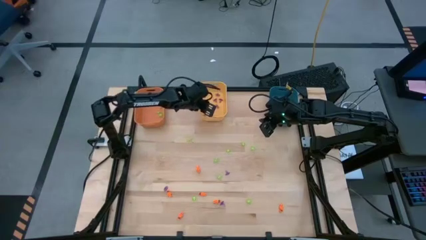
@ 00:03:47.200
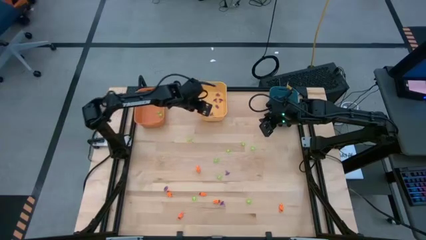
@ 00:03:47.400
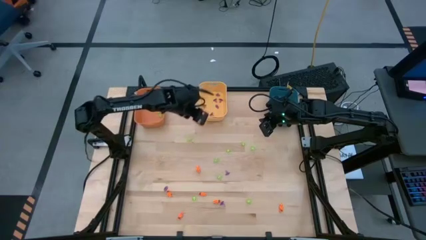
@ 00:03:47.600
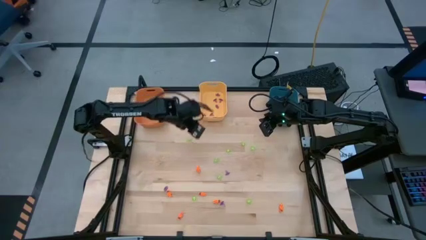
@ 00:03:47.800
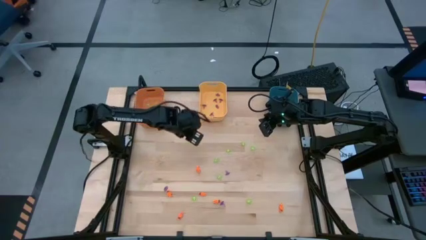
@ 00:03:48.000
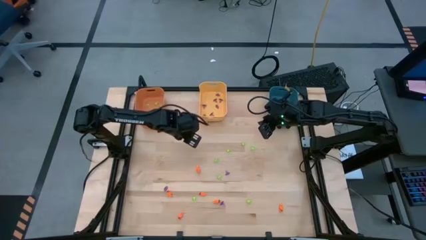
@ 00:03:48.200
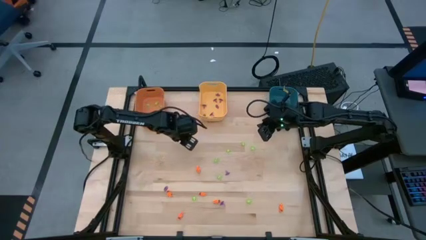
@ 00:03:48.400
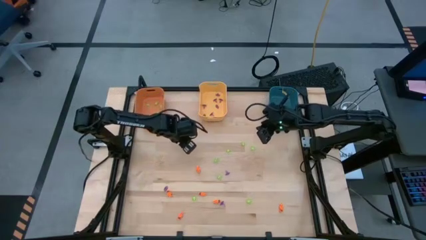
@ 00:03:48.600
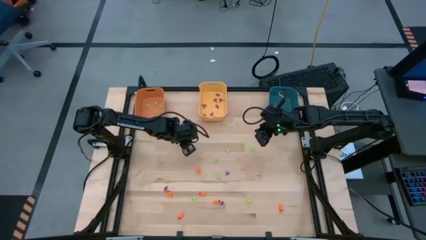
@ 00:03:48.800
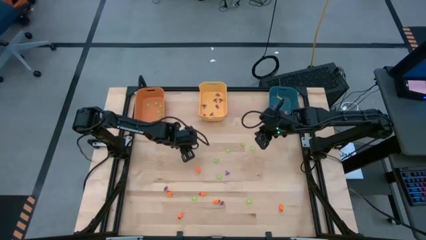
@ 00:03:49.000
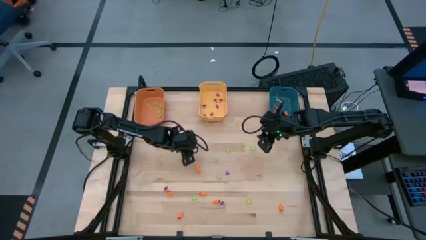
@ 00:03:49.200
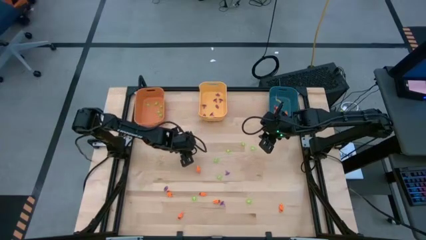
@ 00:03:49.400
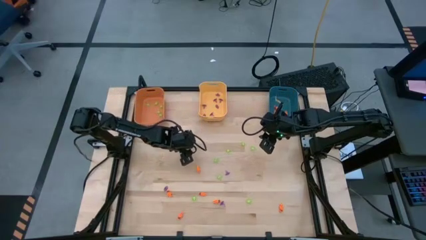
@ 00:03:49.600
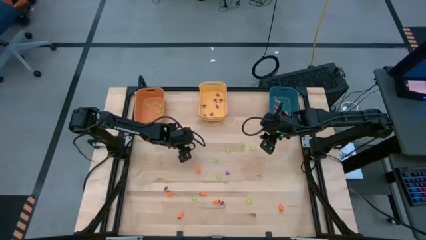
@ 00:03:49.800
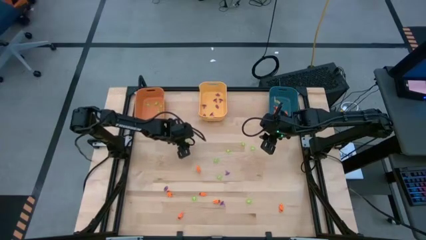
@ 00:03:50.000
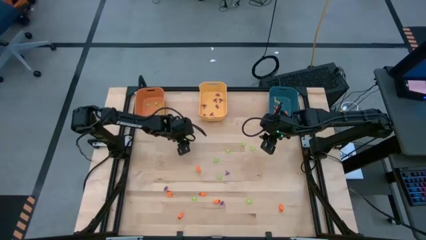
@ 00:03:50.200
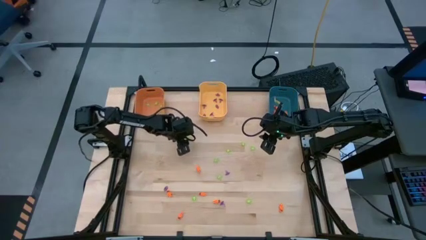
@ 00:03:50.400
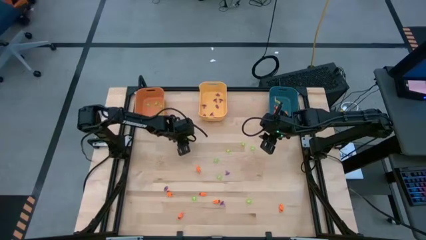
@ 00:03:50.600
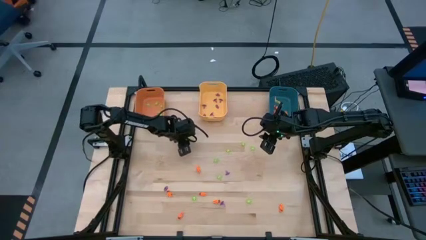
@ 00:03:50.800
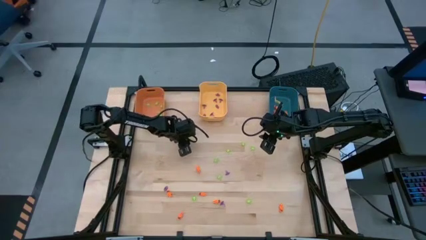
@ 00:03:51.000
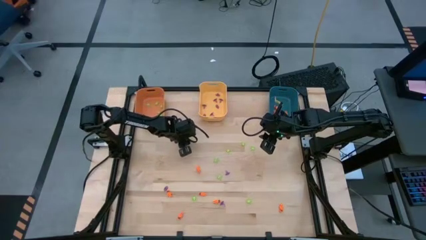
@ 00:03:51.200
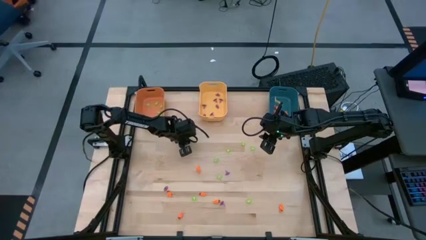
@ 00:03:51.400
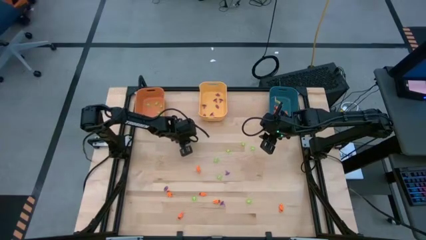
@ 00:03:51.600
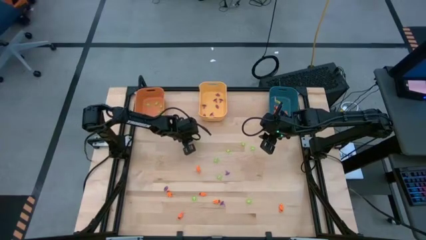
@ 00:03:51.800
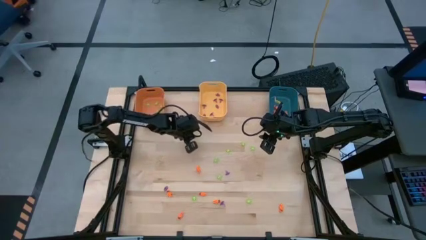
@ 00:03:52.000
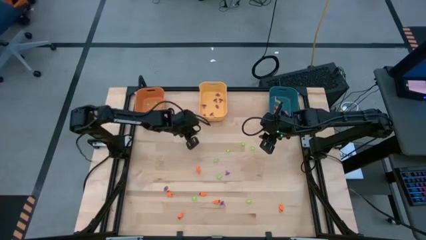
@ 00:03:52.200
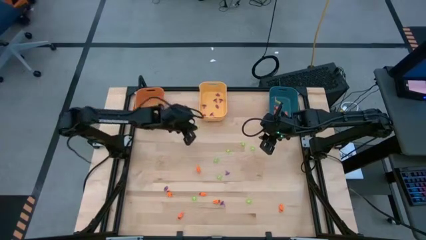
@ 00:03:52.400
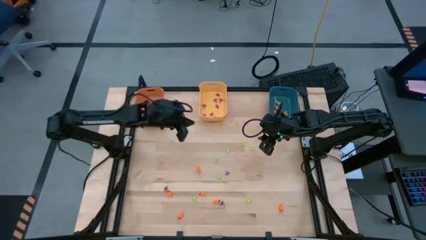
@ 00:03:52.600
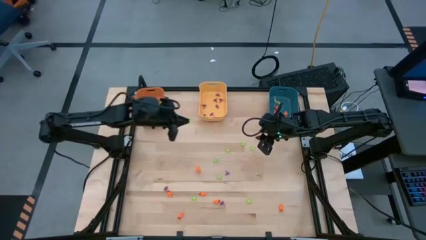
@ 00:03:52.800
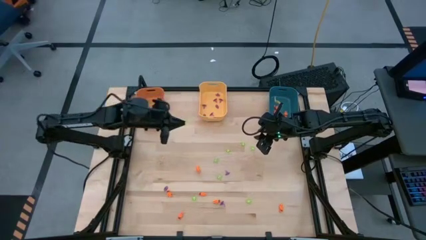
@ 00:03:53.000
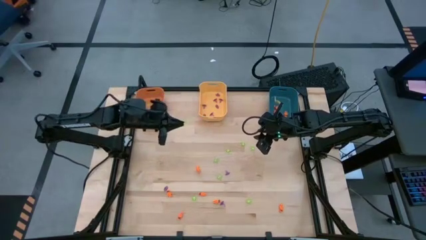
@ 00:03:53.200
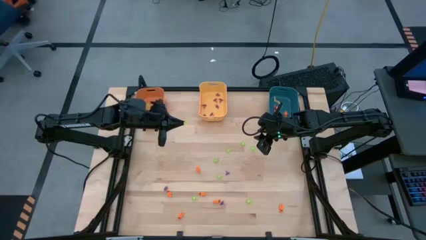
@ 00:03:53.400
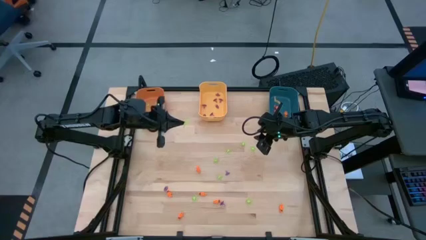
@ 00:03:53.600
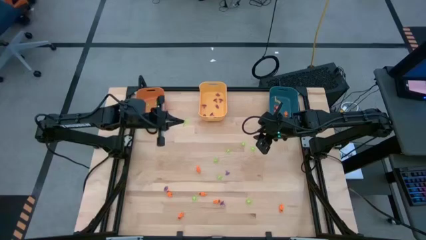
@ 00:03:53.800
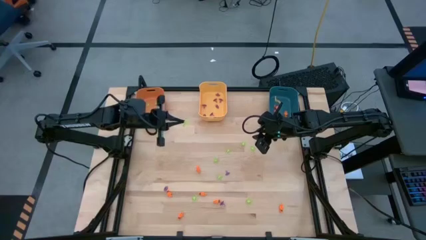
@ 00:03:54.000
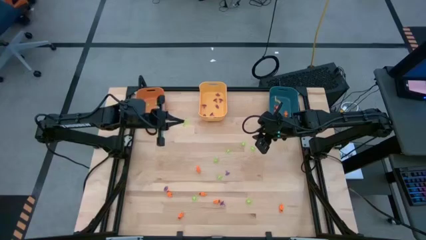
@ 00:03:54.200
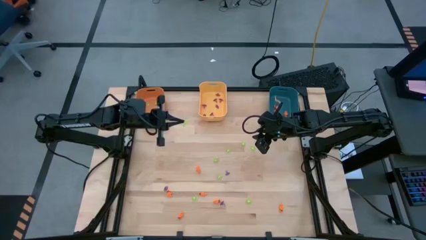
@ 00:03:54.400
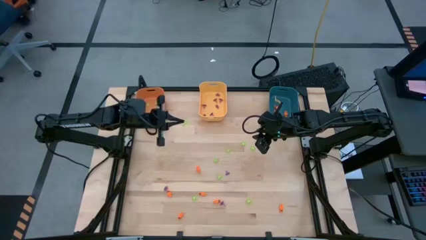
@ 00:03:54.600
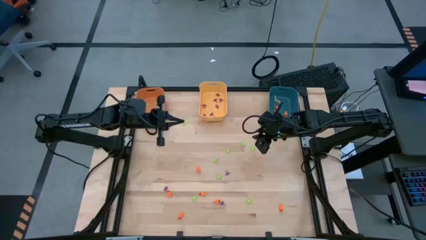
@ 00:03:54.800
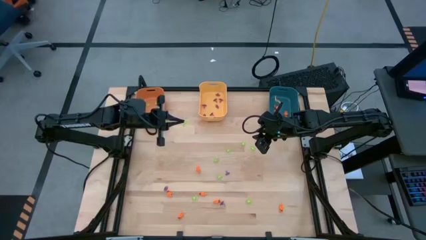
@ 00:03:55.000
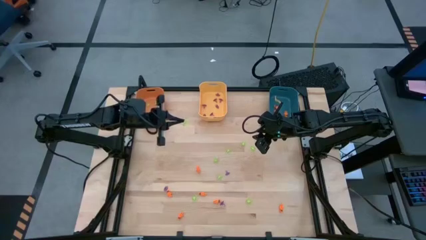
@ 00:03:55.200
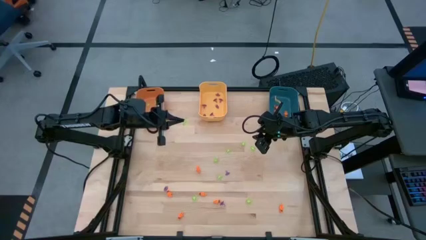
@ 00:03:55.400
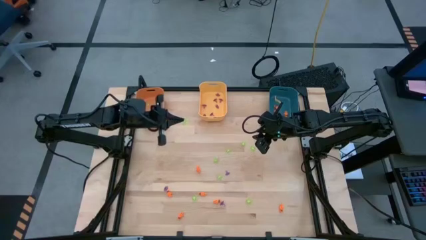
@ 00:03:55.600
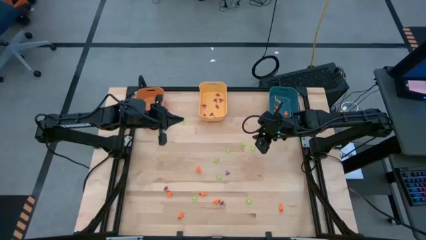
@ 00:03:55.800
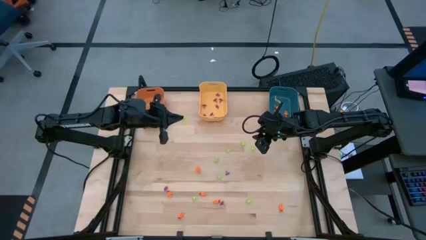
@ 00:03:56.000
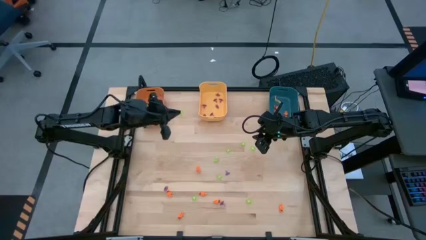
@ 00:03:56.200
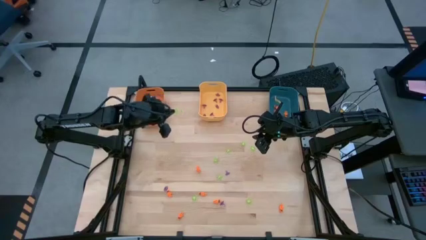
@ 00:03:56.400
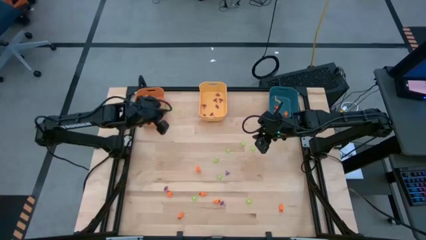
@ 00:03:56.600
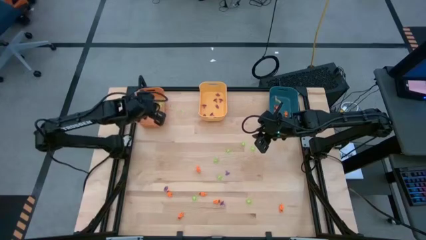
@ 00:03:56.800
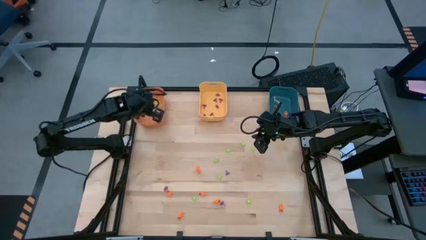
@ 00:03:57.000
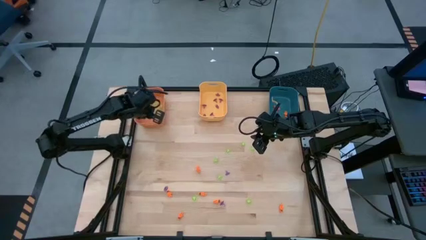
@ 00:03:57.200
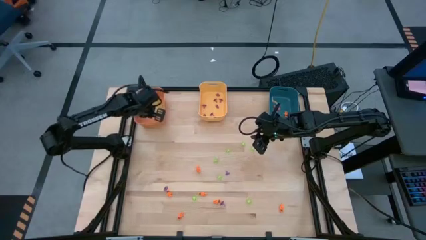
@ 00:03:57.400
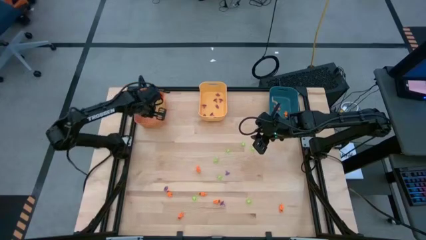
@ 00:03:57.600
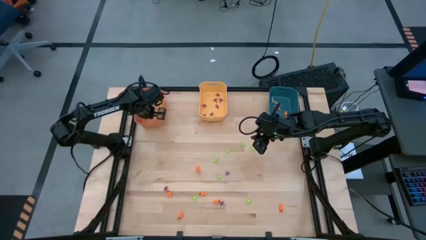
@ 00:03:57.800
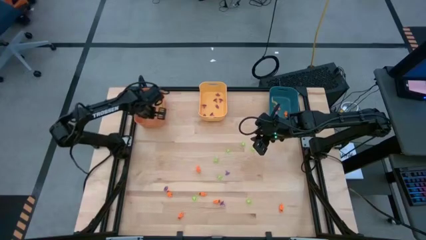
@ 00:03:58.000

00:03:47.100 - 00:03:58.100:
Task: Sort Halloween decoration
Put the green spider toy into the orange bin

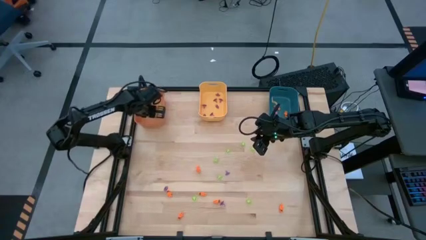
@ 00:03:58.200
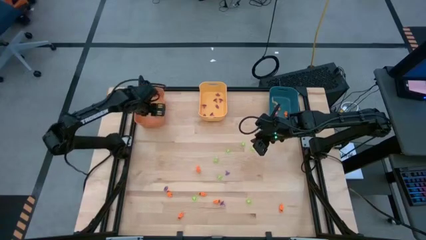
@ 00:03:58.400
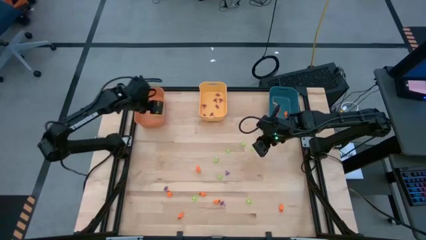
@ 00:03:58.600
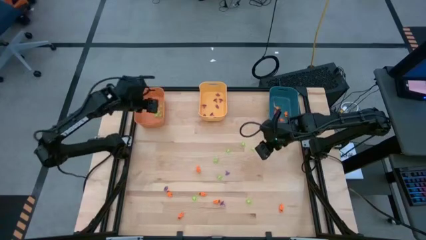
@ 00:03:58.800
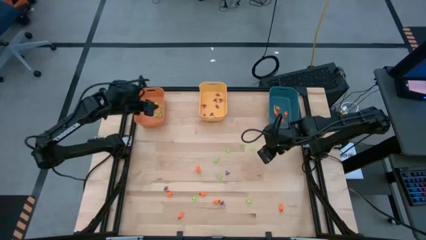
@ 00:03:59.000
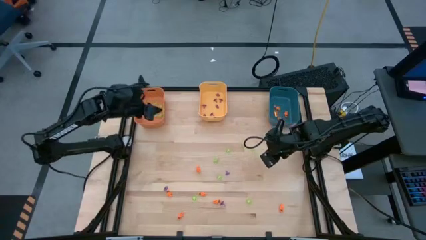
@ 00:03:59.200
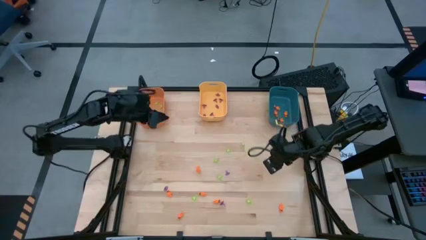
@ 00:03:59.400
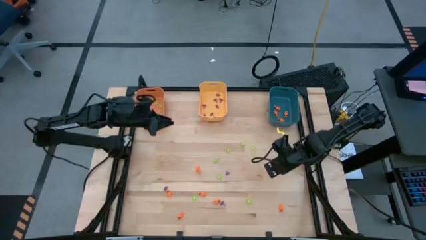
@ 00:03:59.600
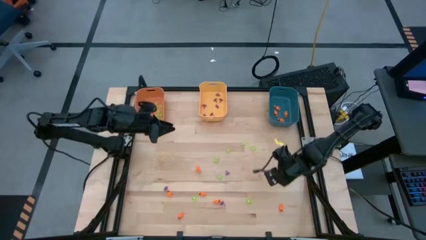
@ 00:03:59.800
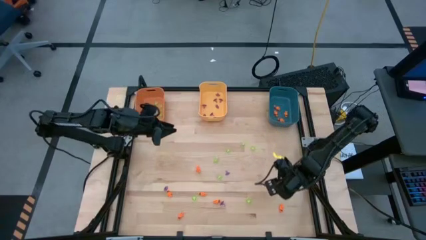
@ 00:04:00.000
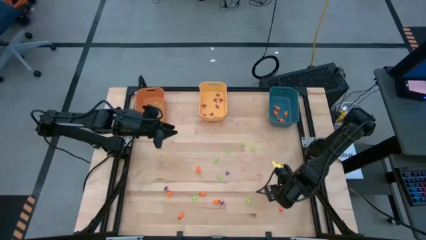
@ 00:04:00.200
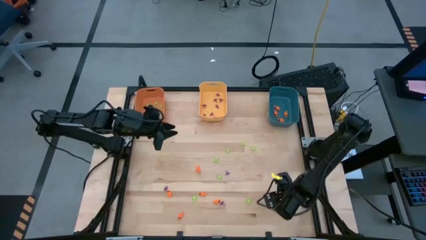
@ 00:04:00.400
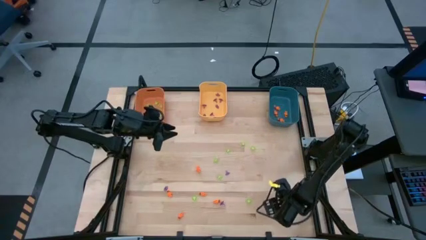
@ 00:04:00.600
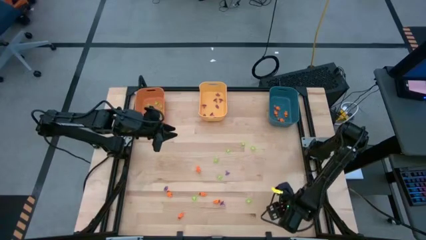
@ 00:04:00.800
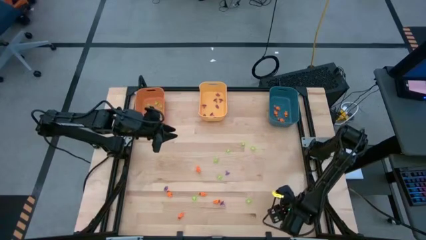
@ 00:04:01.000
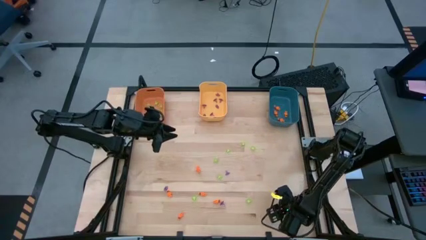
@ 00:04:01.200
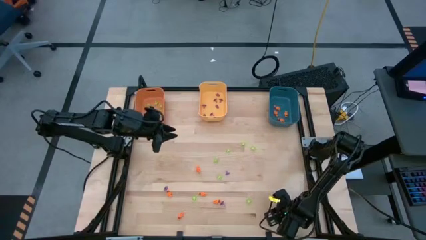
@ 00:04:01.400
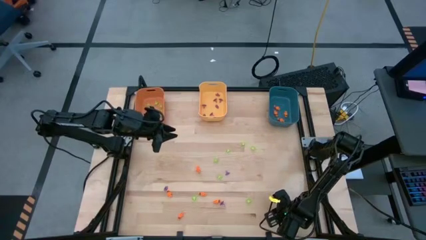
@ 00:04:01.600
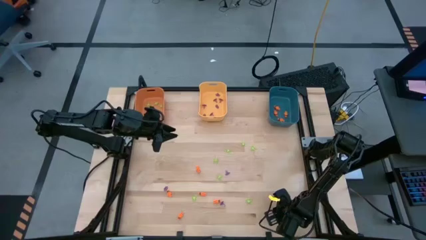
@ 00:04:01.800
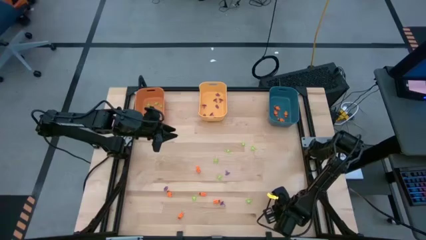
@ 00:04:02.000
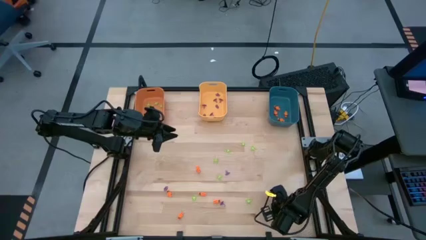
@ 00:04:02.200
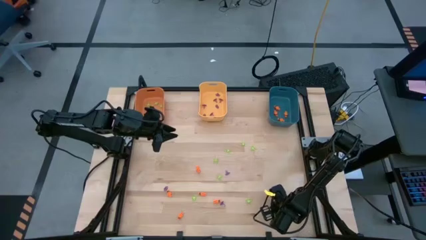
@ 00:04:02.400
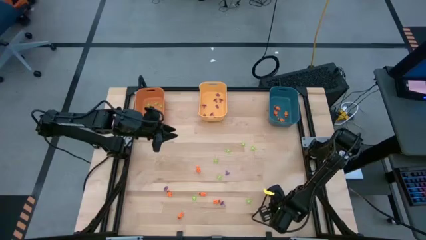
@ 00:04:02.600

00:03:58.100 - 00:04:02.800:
Put the orange skeleton toy into the blue bin

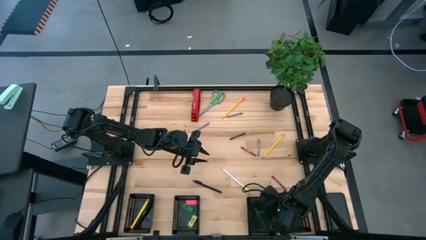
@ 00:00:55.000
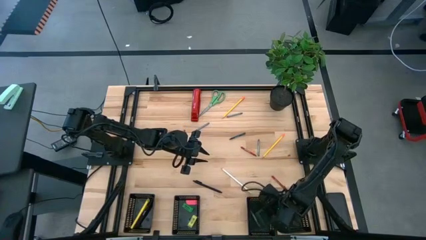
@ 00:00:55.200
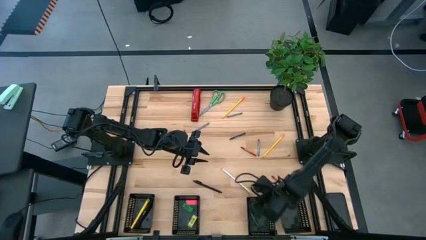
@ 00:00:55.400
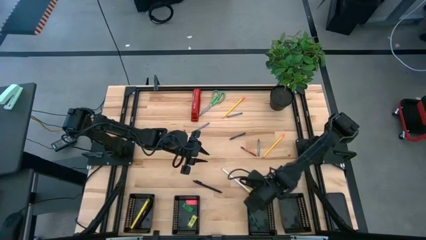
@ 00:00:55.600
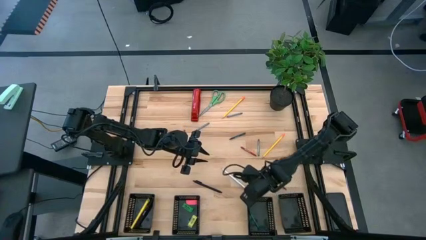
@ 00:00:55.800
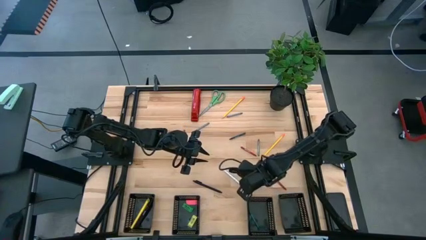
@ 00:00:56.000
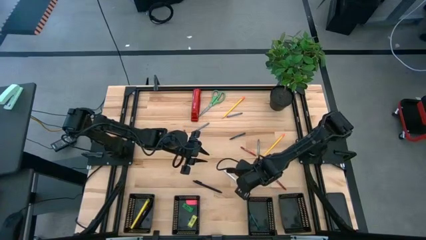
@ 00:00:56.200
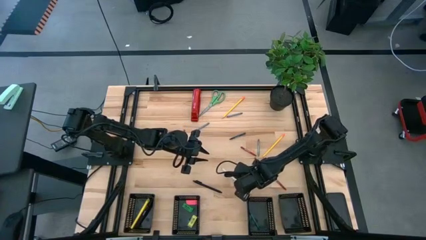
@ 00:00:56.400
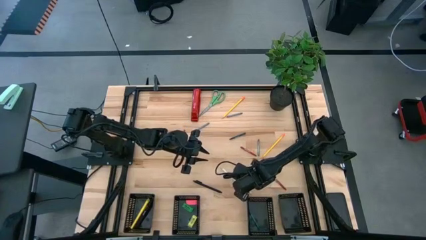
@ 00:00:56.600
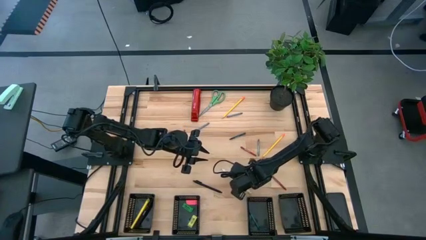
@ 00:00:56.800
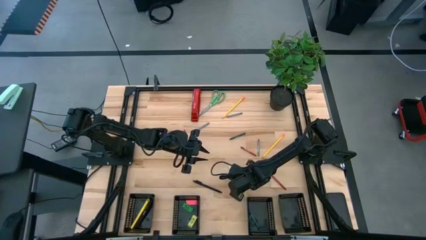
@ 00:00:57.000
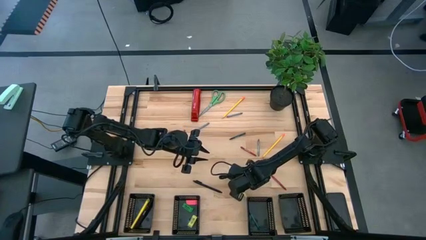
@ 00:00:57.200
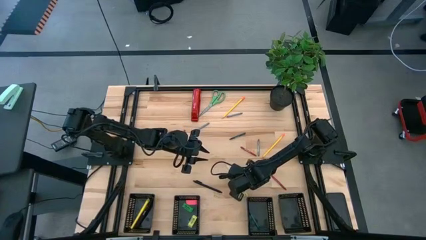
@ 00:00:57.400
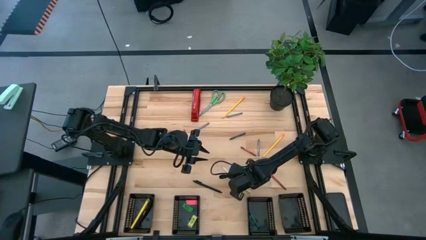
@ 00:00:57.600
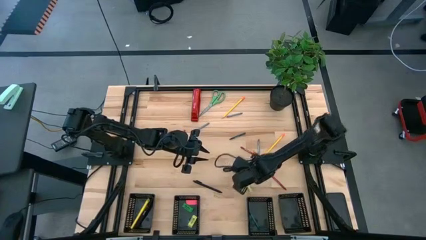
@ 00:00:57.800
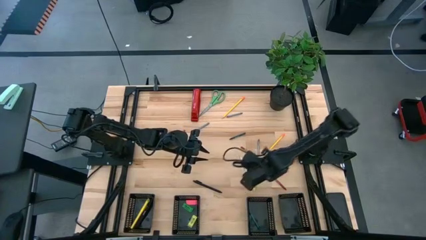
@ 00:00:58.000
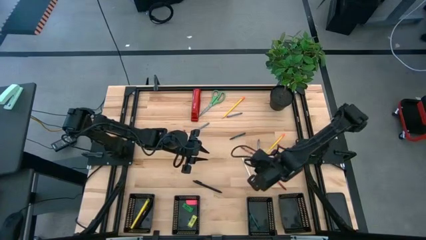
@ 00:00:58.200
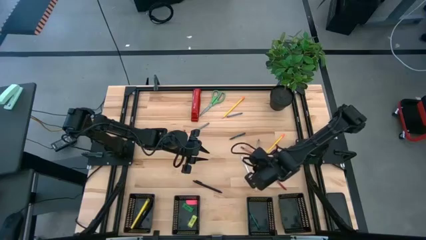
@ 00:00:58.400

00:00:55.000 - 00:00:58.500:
Task: Sort crayons/erasers/pens/pencils in bins
Put the white pencil into the right black bin
